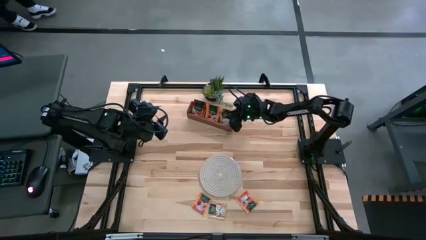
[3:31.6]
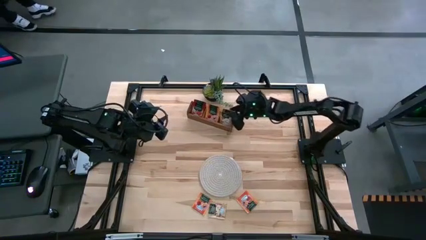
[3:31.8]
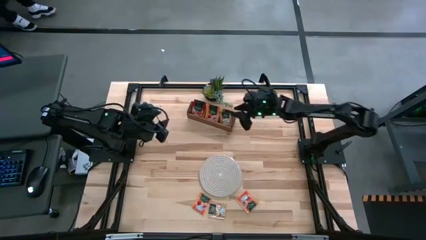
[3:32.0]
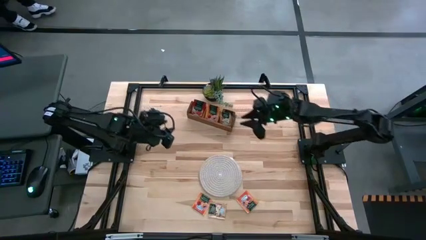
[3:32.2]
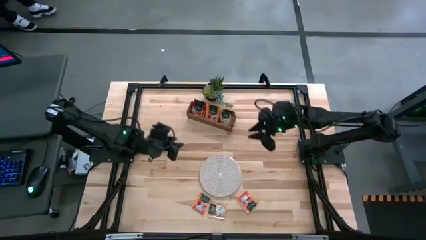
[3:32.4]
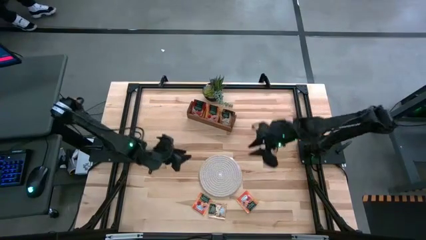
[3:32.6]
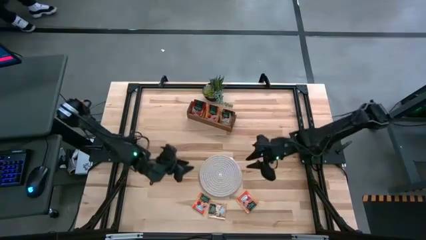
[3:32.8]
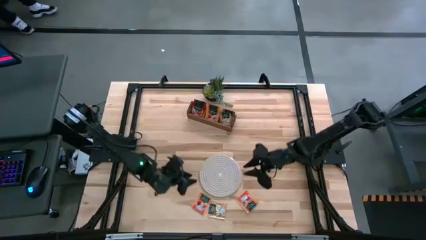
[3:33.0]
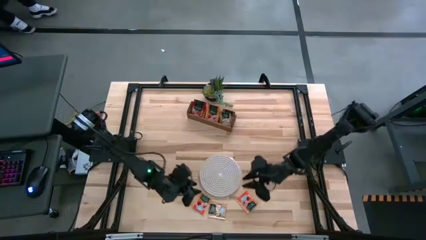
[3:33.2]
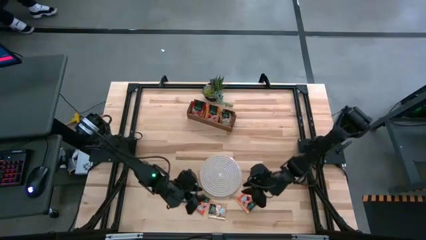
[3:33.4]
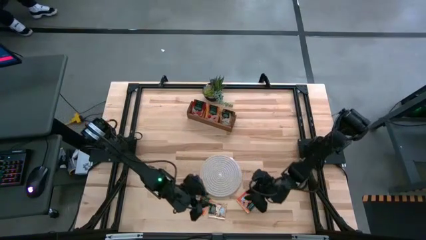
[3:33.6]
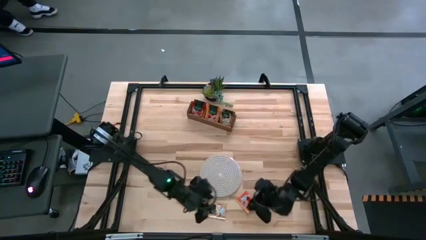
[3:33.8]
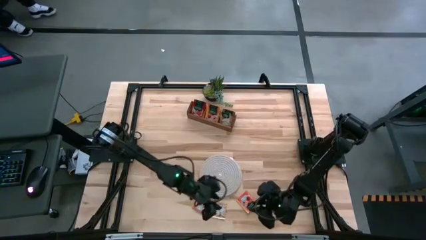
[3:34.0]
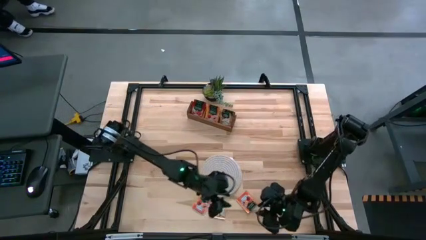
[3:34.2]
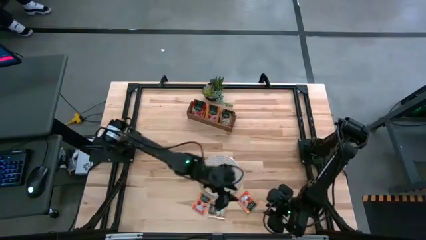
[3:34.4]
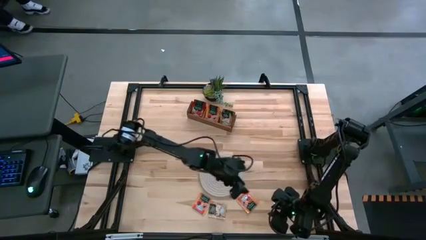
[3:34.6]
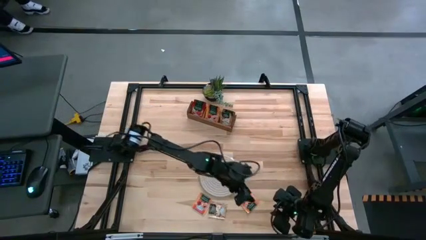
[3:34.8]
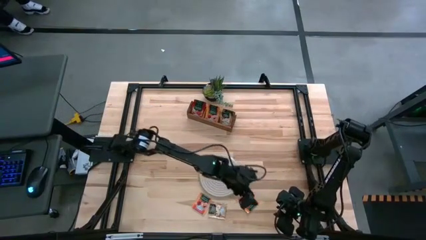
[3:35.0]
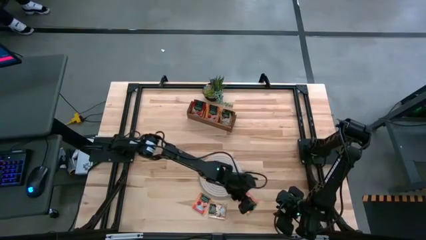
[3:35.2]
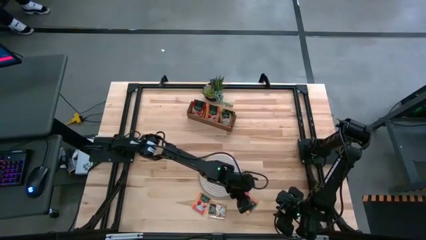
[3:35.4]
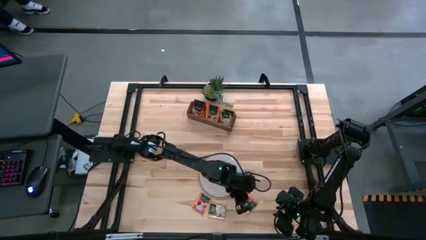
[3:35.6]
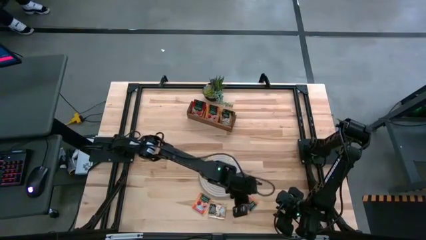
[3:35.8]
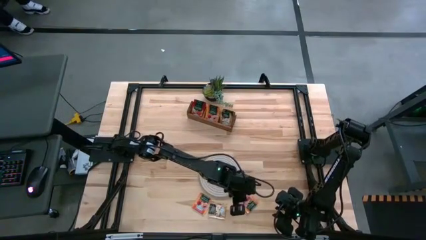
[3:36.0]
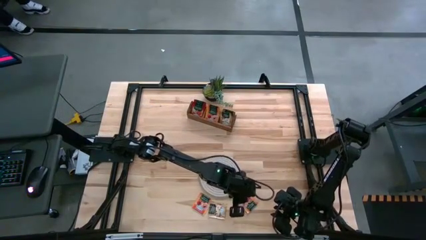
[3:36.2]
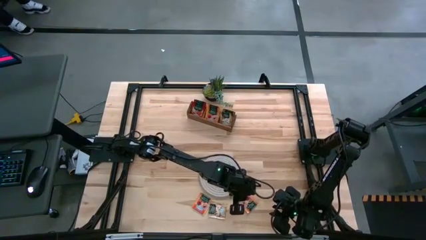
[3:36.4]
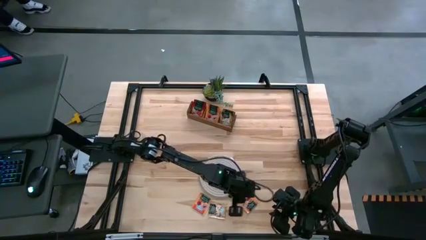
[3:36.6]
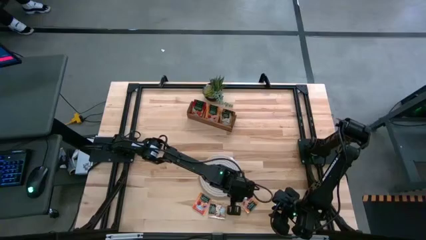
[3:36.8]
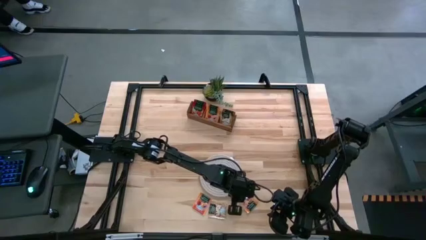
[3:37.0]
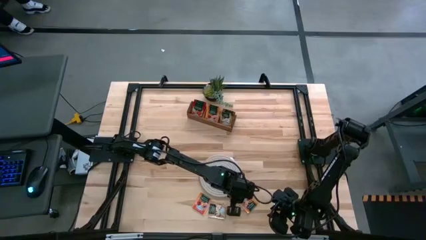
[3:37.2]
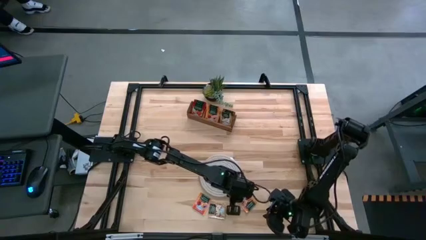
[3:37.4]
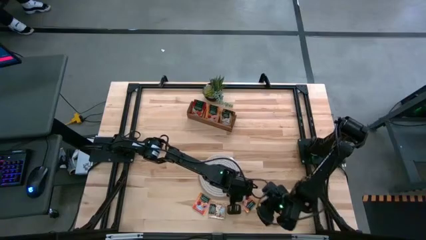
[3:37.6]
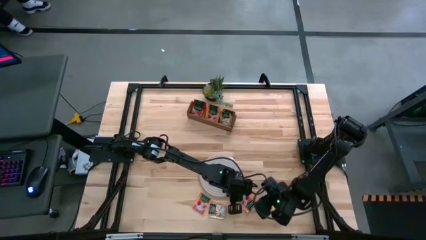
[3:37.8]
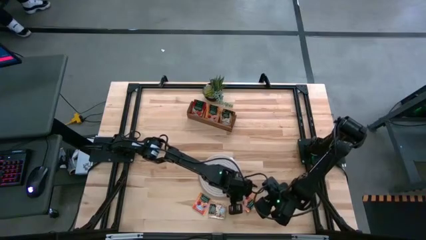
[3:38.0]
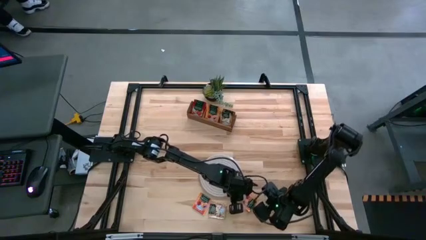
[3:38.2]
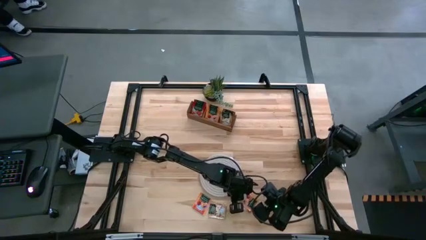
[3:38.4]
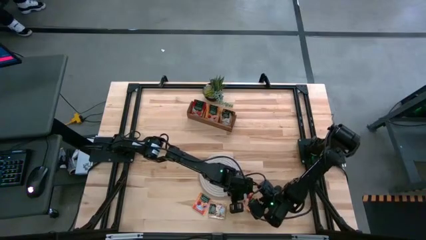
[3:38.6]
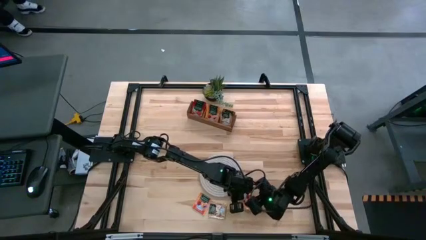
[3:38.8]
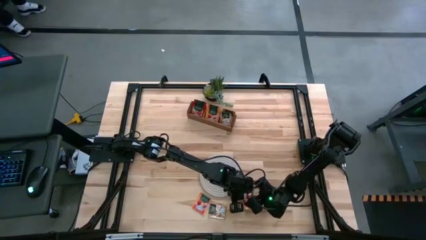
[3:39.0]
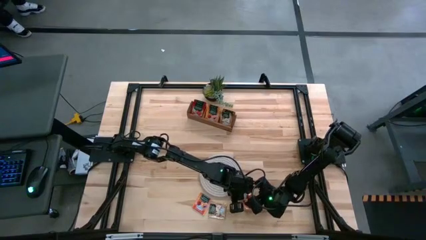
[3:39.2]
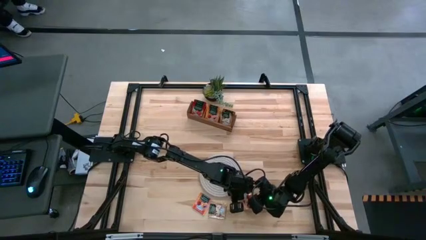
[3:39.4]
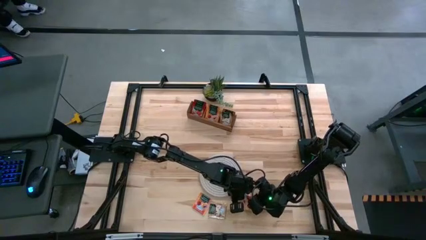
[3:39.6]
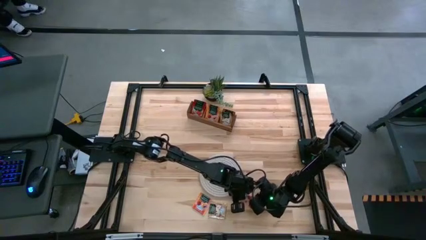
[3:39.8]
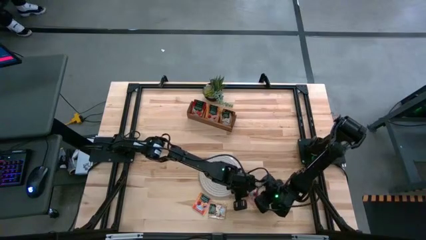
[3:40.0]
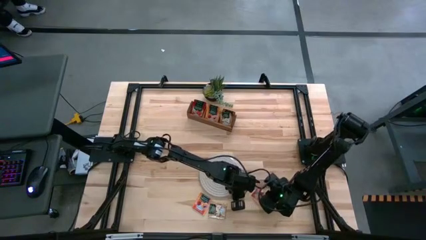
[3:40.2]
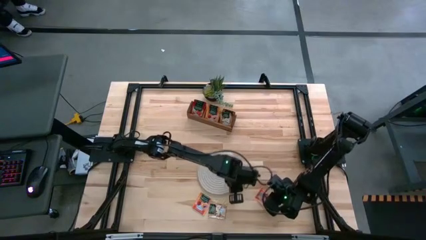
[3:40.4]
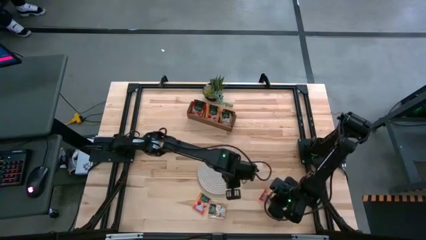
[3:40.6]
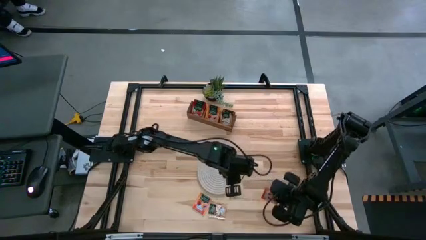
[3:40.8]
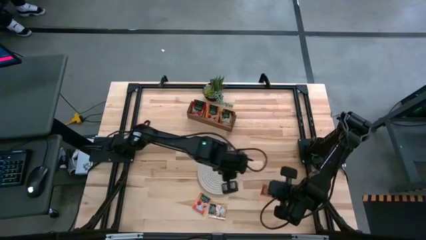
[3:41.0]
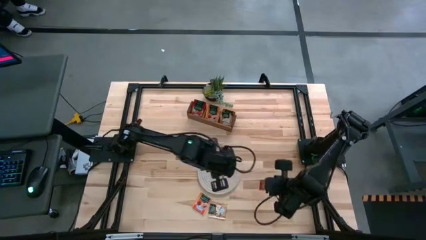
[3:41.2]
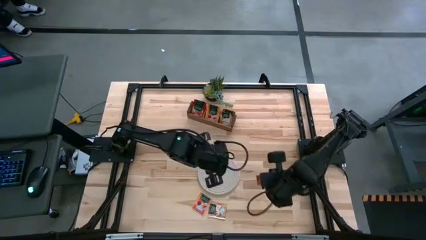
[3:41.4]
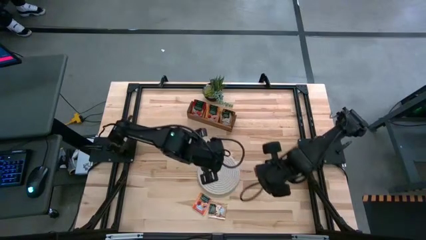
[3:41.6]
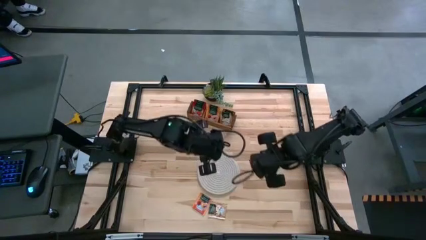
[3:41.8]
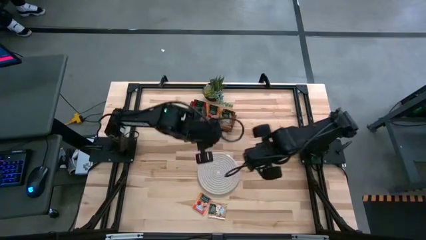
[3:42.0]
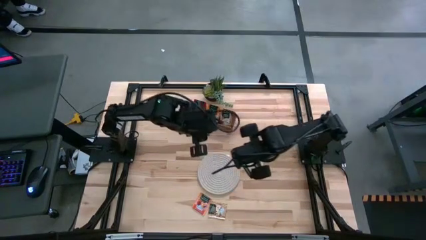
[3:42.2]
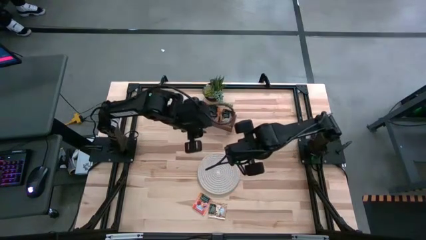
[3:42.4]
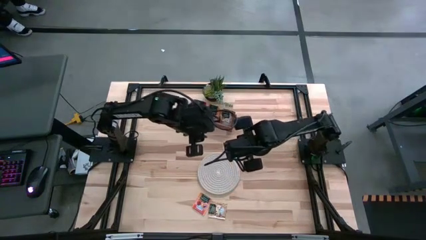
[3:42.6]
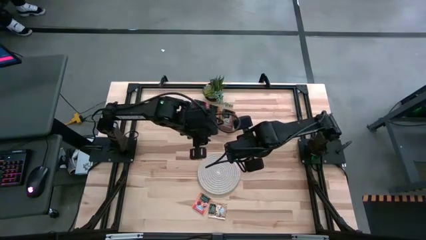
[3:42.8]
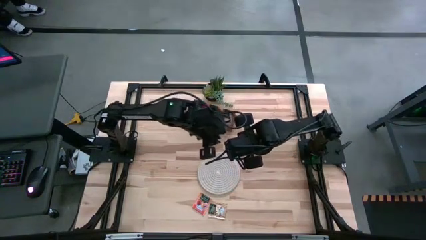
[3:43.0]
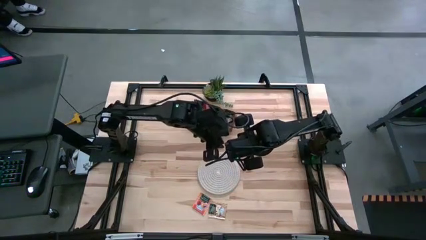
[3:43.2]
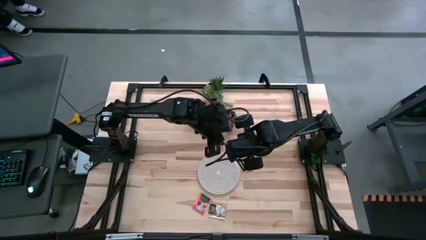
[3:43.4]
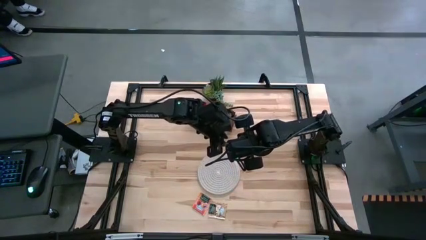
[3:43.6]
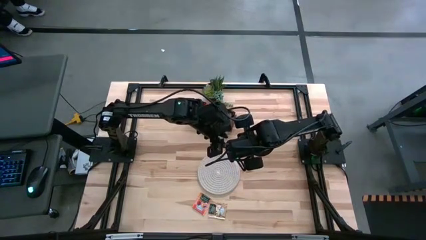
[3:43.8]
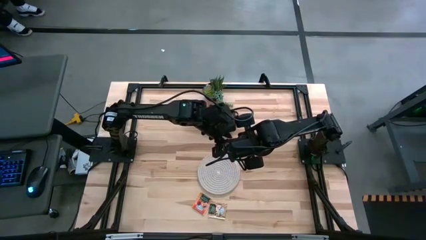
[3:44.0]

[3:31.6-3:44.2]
Task: Pick & Place Tea
Put the orange tea bag into the middle section of the wooden organizer

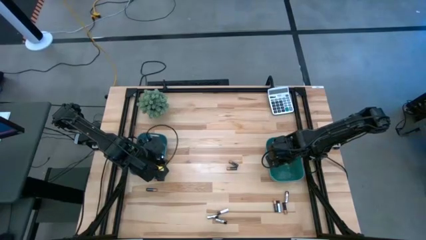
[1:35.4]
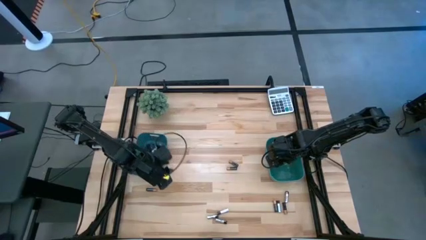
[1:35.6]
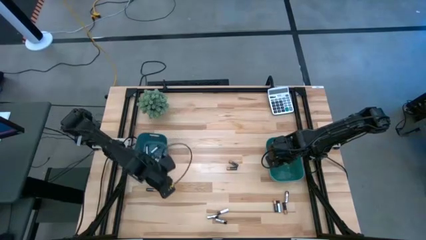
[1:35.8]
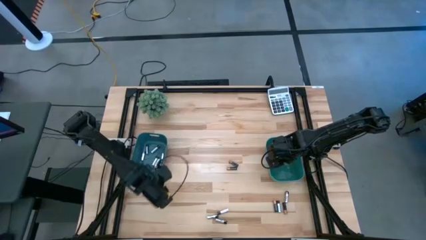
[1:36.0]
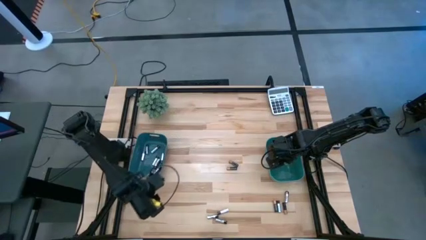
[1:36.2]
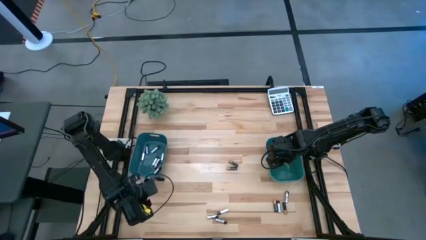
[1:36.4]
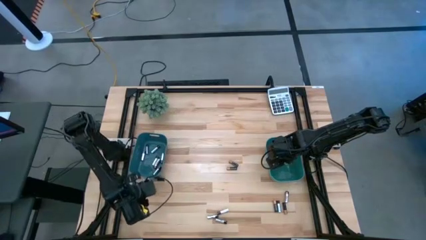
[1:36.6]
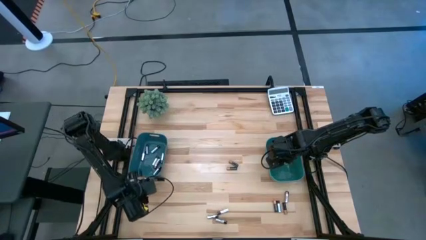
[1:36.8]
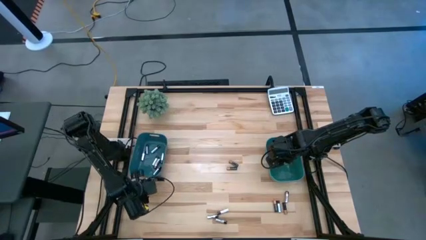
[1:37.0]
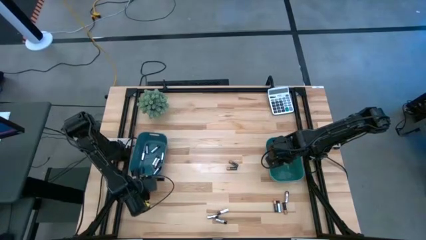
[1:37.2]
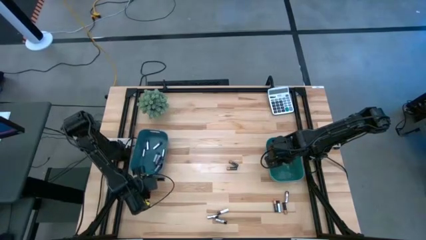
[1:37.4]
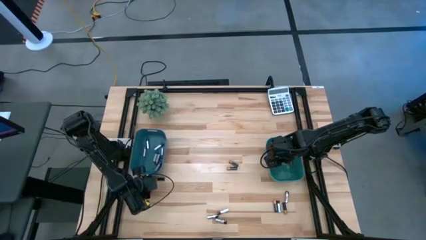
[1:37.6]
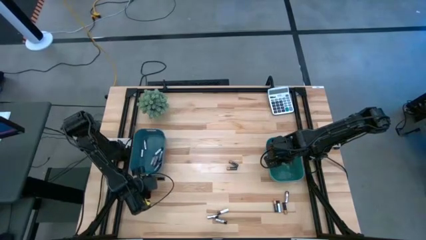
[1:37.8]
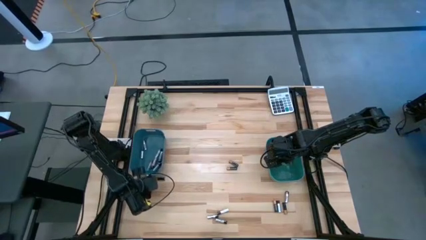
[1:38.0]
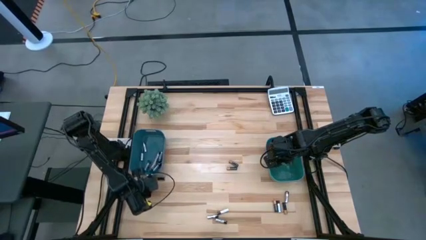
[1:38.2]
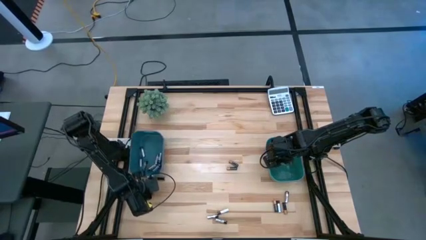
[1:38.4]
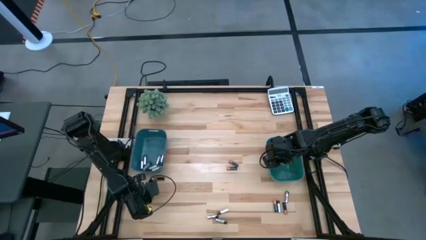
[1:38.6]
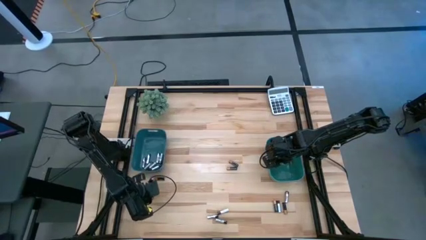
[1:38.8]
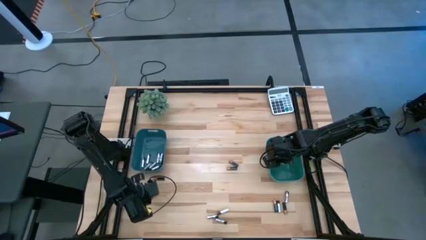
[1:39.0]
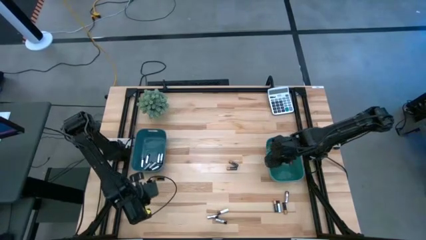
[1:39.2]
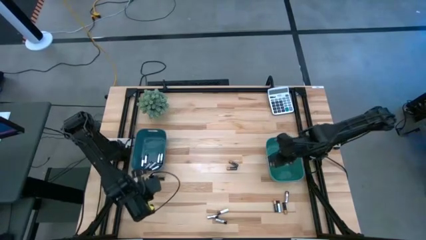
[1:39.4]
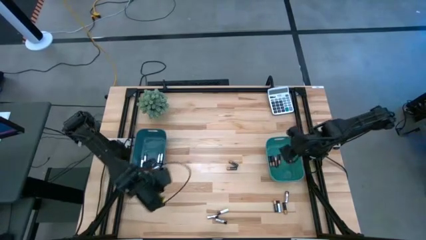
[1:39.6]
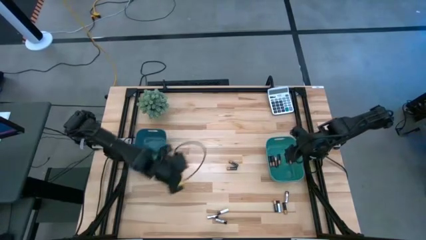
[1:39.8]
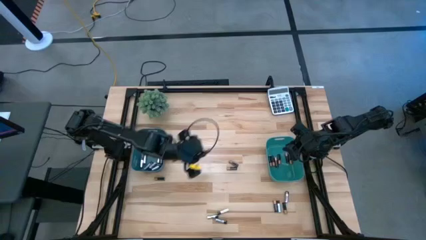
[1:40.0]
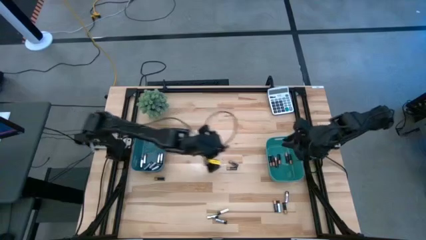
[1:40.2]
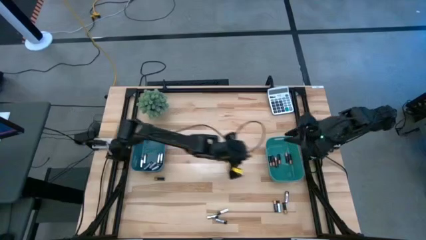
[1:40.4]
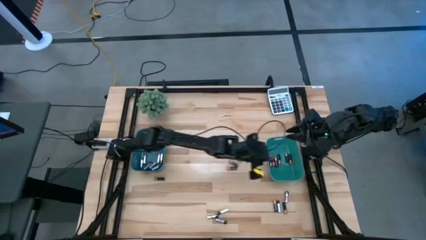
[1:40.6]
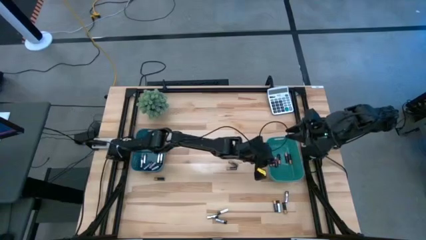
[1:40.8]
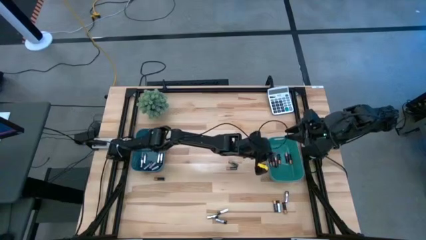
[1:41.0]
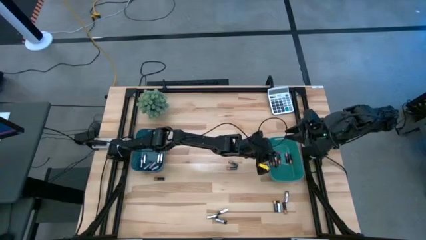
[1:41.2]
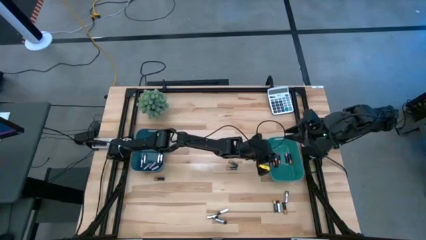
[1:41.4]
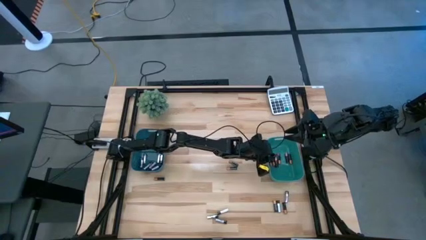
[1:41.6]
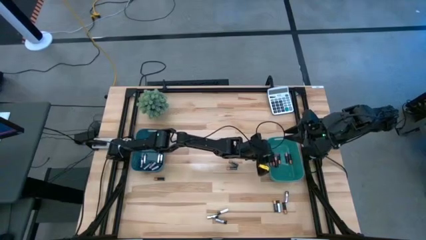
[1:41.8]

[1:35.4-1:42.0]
Task: Sort batteries
Put the black battery into the green bin
